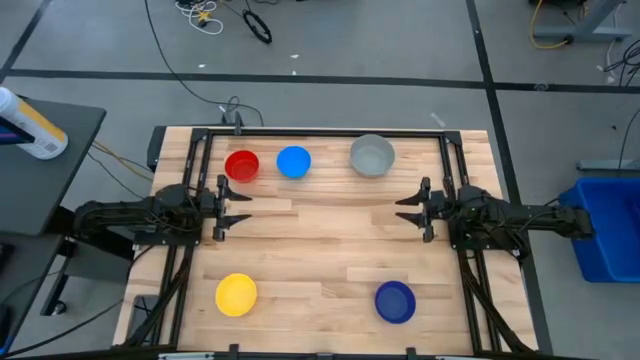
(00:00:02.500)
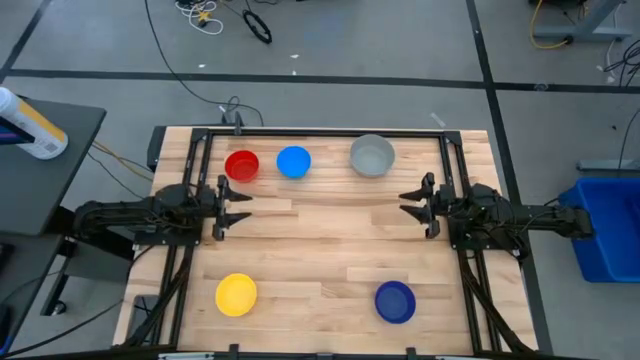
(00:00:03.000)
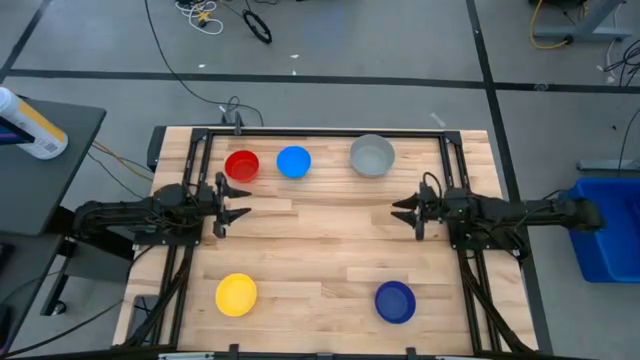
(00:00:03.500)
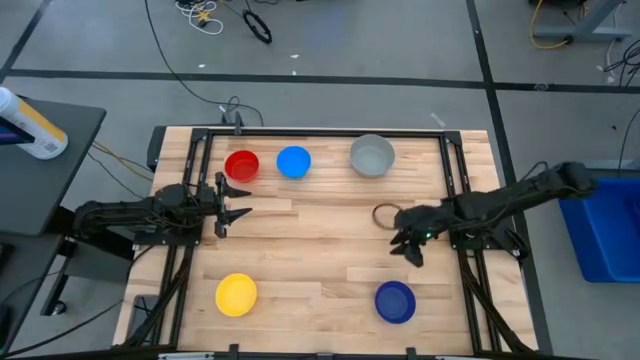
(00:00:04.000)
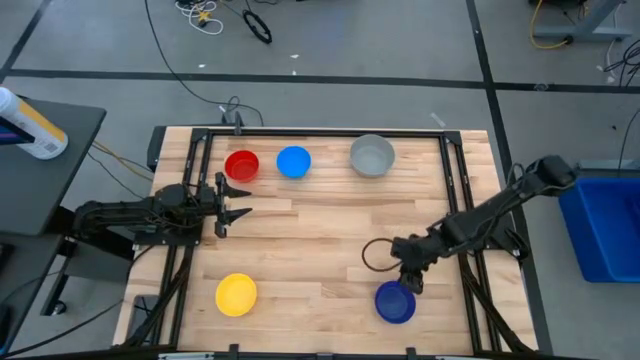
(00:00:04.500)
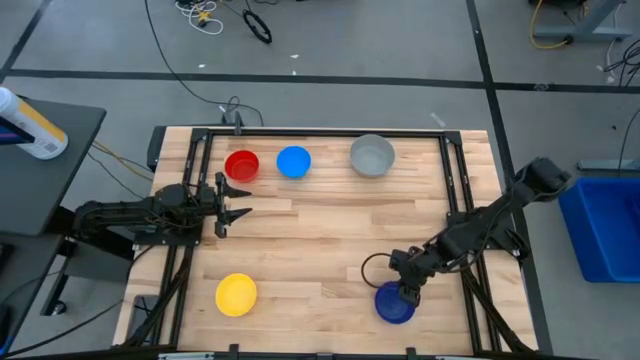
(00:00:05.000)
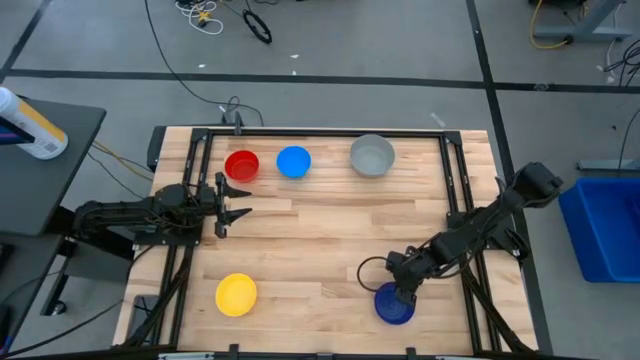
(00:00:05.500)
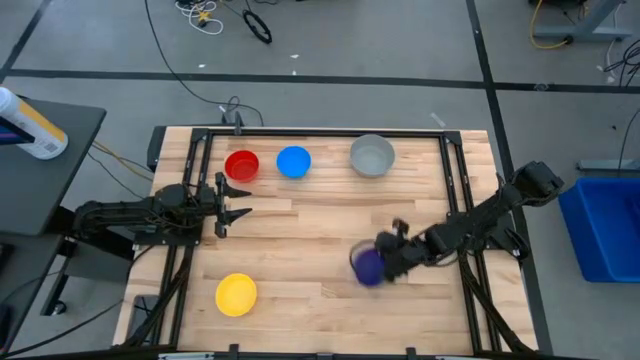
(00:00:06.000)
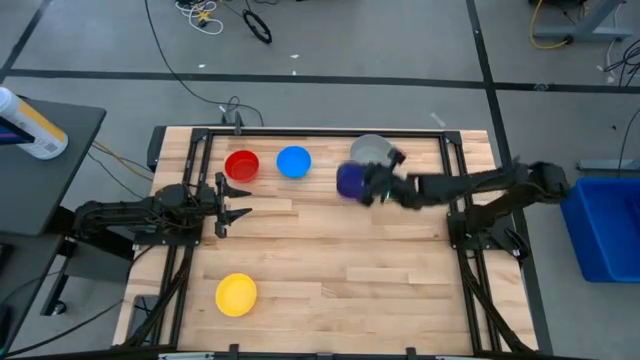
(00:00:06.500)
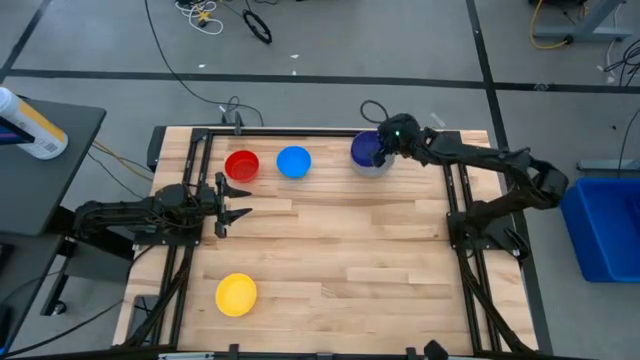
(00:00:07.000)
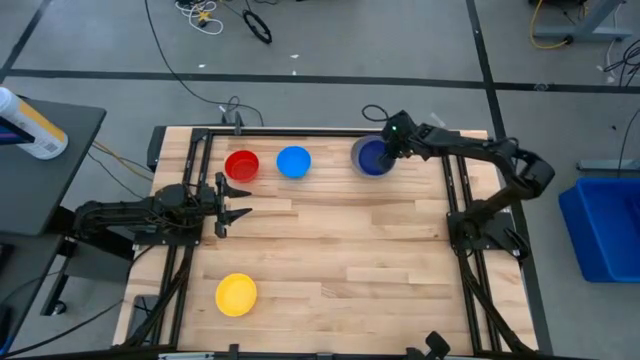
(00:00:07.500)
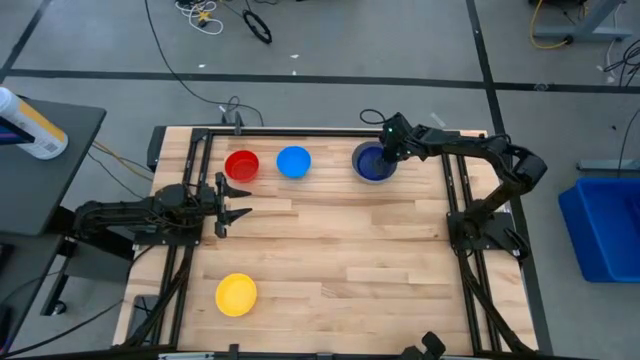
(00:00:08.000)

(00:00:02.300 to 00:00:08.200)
Stack the dark blue bowl on the gray bowl

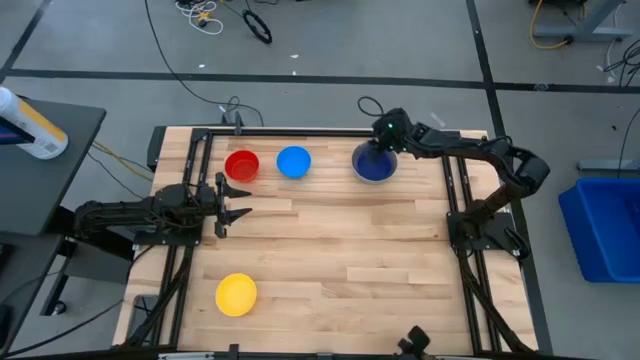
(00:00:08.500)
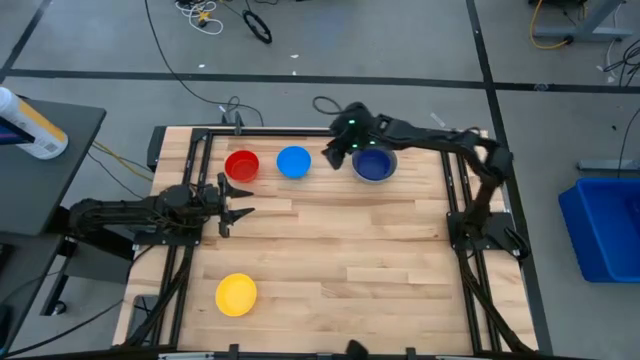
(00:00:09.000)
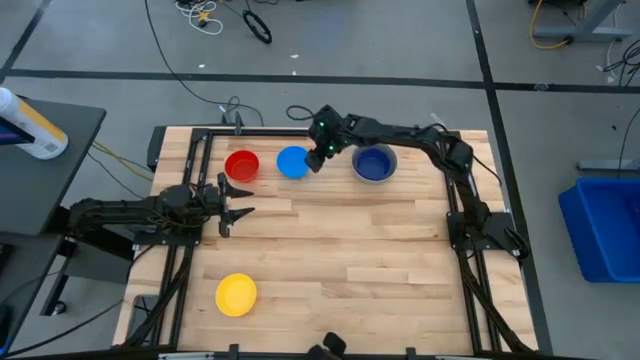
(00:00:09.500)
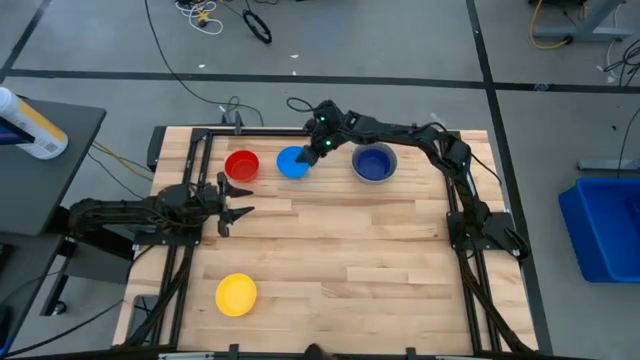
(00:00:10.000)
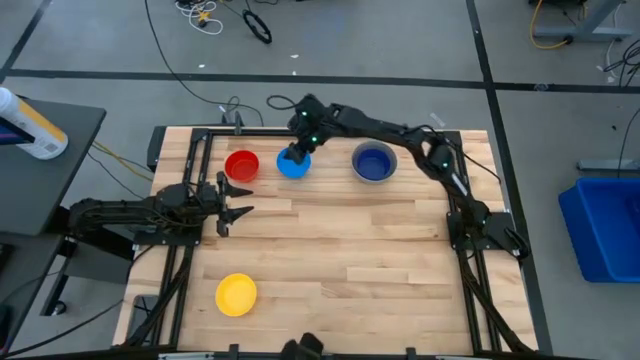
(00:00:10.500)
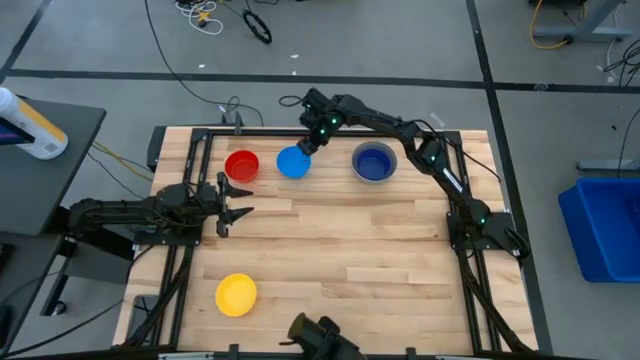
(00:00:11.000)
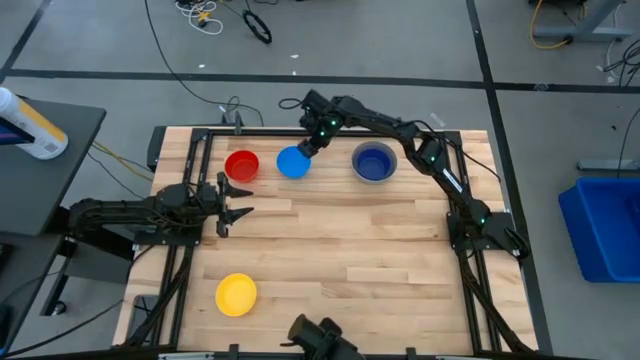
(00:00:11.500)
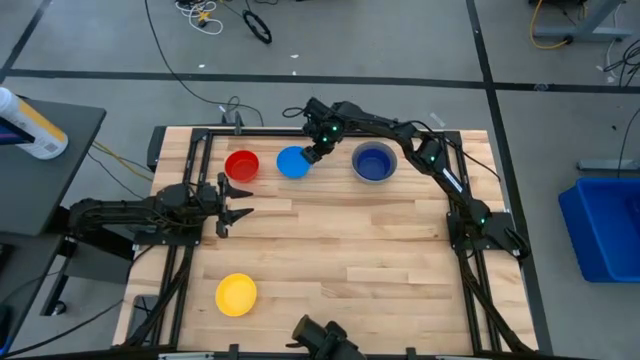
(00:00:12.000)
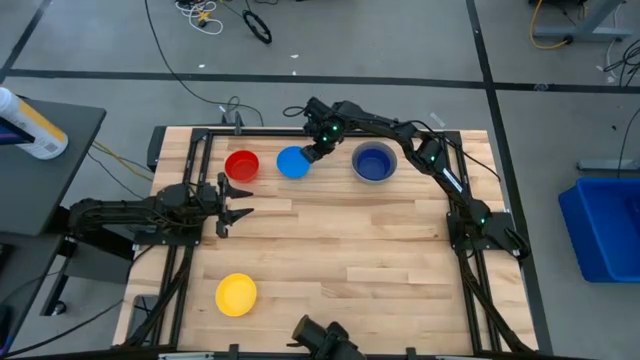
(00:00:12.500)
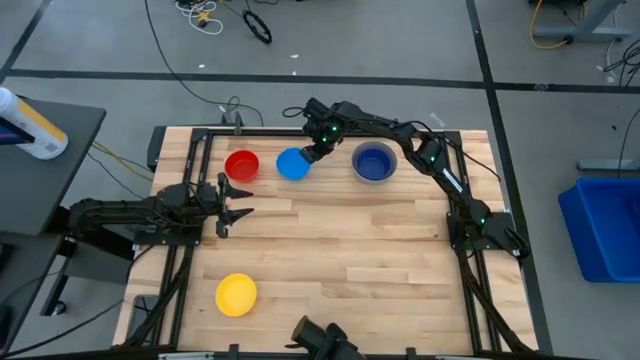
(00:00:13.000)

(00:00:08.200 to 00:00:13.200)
Stack the light blue bowl on the dark blue bowl

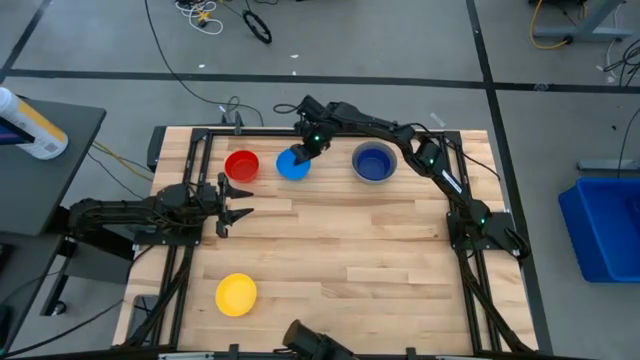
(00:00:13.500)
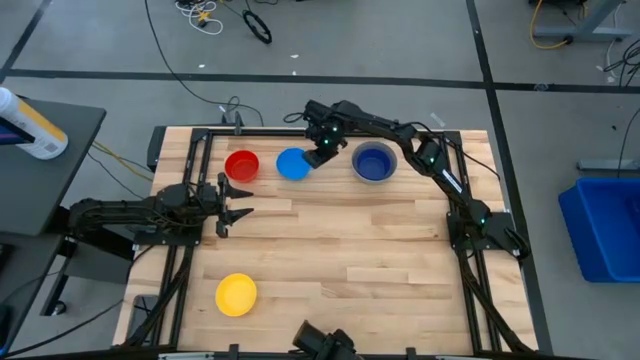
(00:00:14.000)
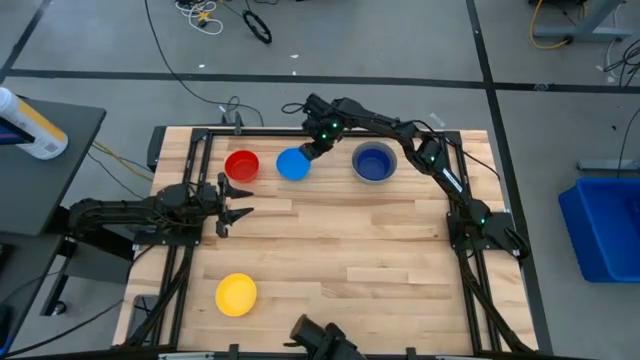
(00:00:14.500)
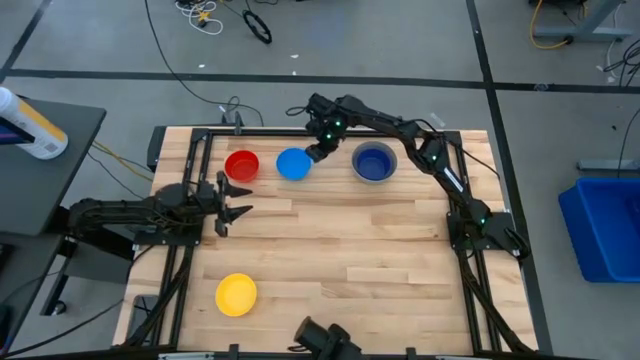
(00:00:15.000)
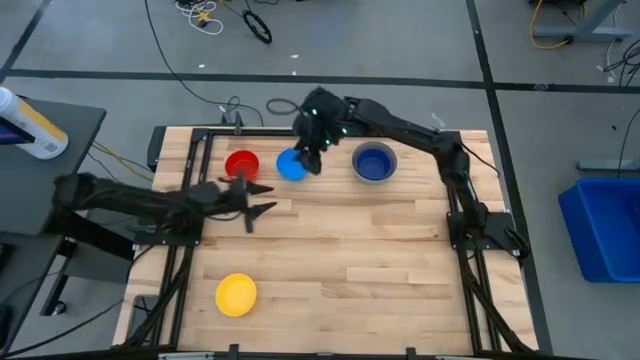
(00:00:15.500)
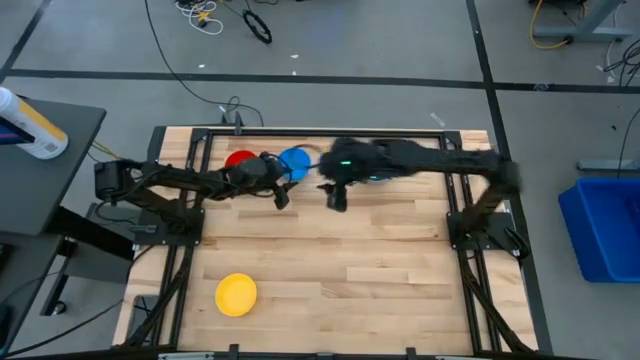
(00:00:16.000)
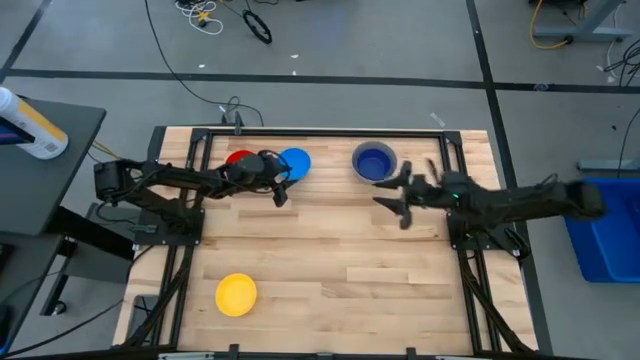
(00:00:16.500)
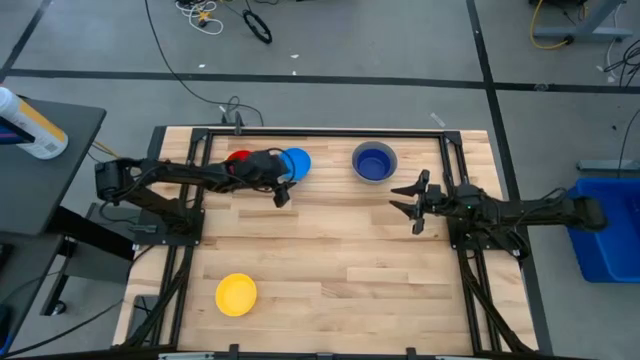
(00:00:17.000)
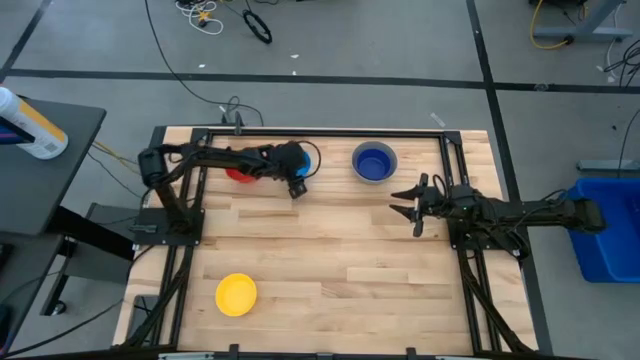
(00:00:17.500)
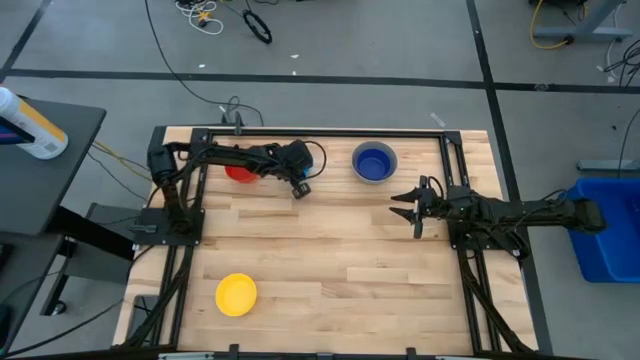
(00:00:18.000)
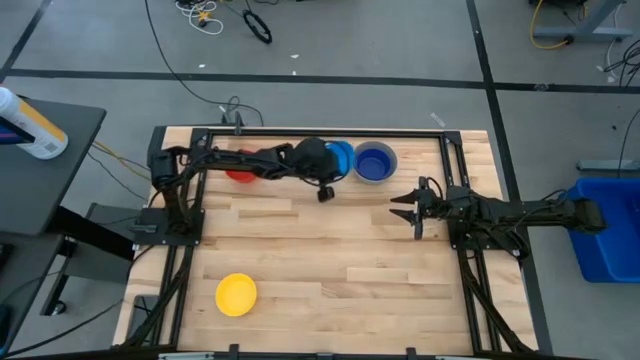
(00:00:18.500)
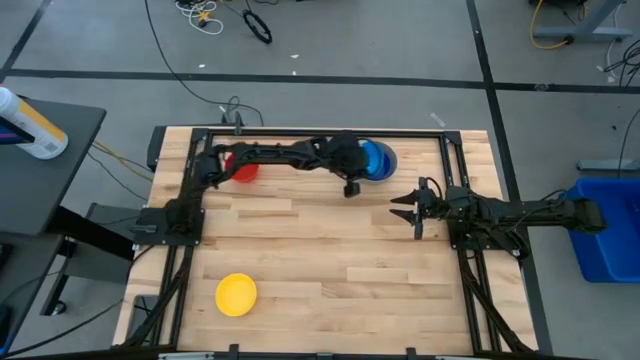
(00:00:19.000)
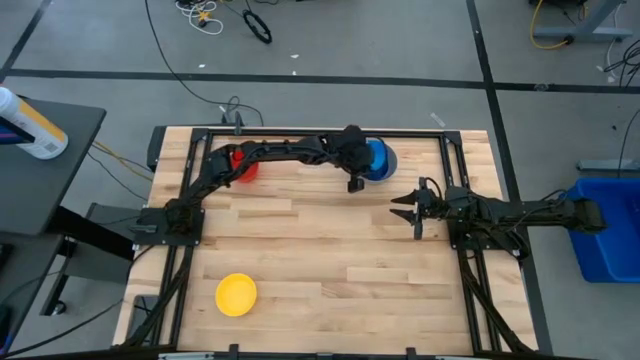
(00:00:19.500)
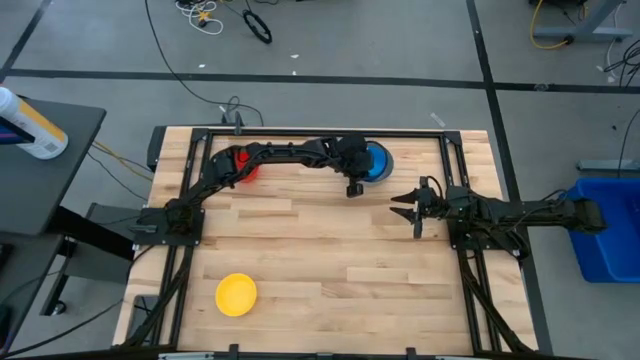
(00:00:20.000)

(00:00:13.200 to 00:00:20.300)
Stack the light blue bowl on the dark blue bowl
